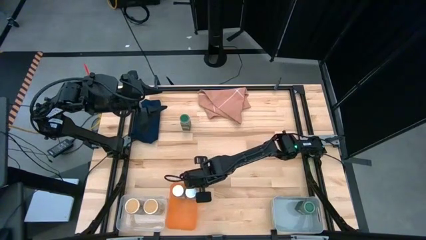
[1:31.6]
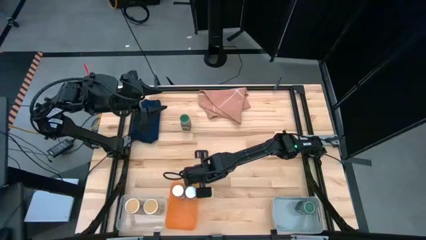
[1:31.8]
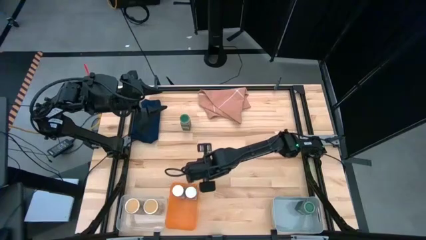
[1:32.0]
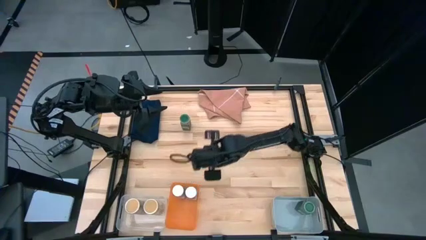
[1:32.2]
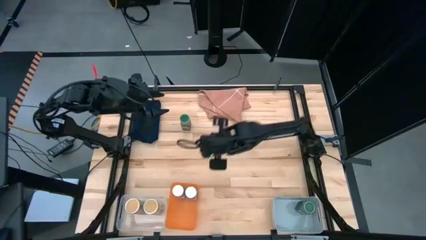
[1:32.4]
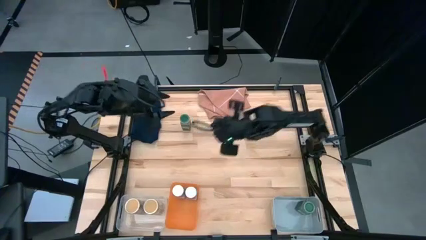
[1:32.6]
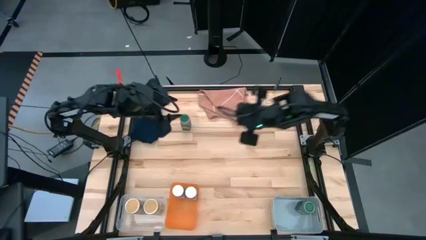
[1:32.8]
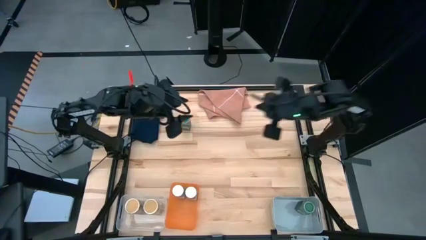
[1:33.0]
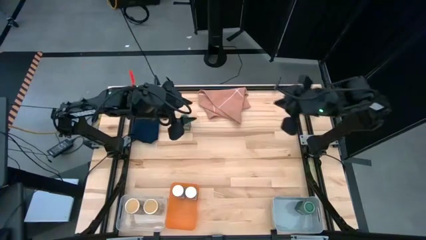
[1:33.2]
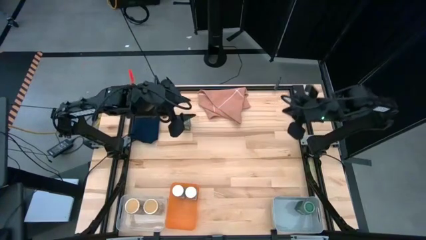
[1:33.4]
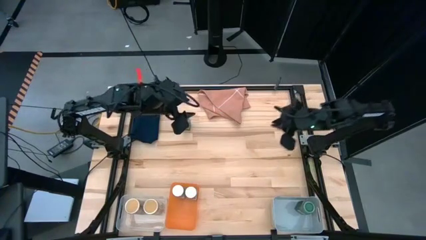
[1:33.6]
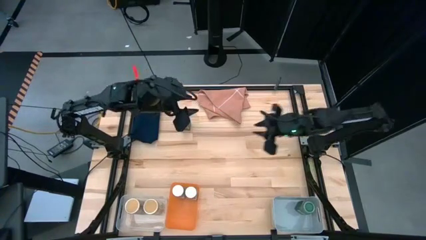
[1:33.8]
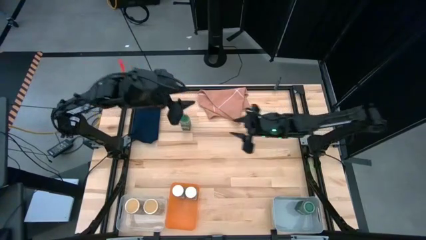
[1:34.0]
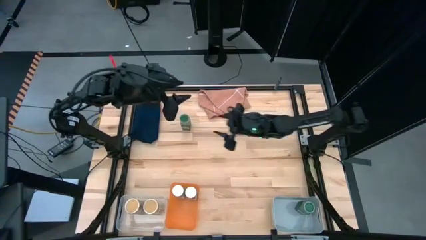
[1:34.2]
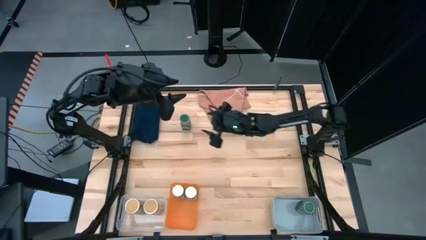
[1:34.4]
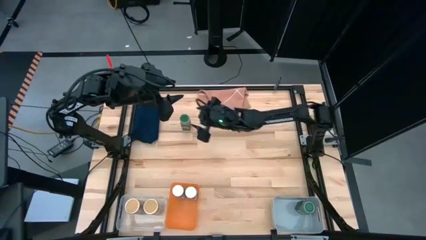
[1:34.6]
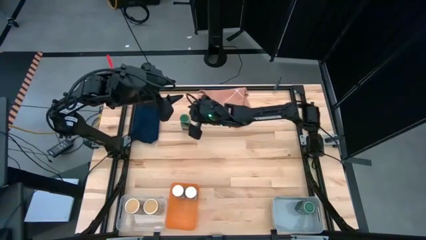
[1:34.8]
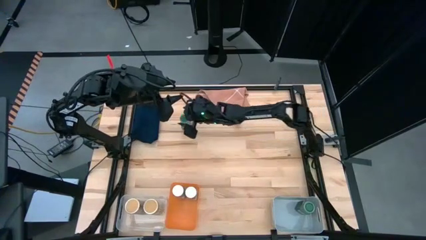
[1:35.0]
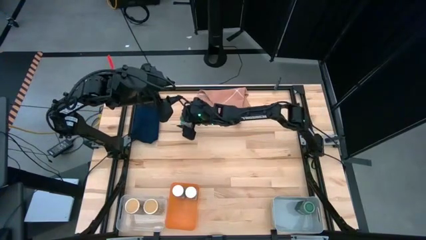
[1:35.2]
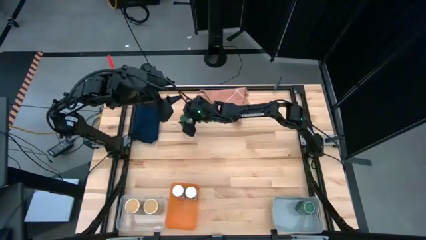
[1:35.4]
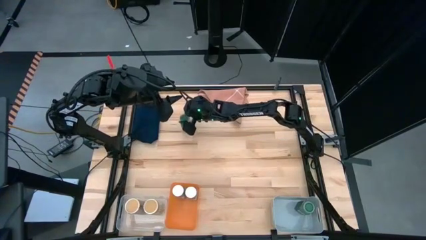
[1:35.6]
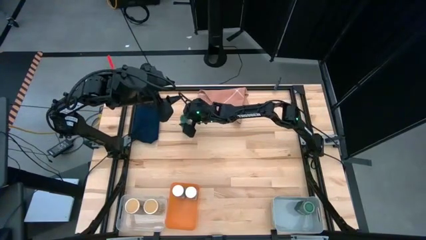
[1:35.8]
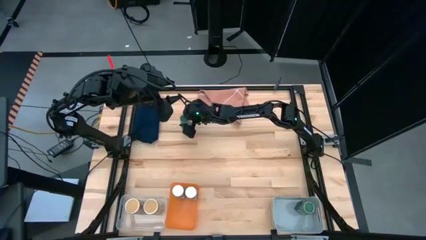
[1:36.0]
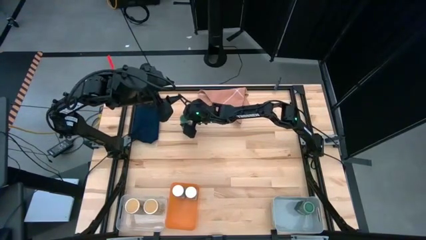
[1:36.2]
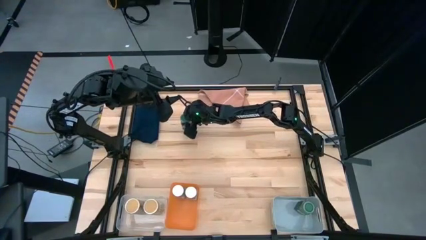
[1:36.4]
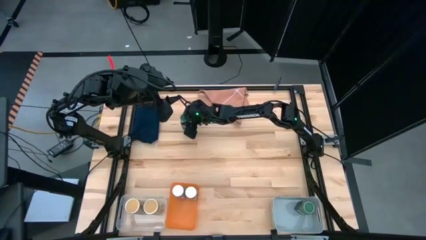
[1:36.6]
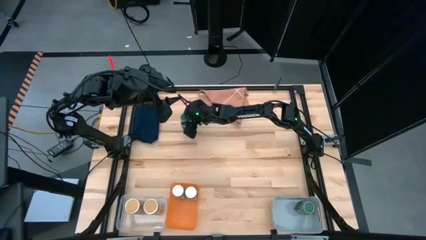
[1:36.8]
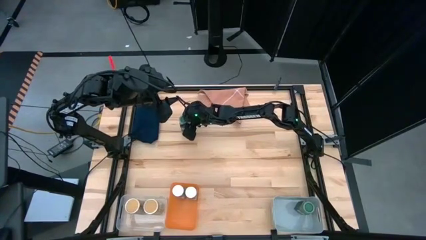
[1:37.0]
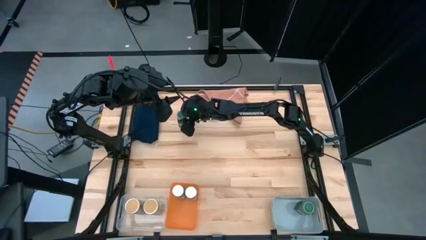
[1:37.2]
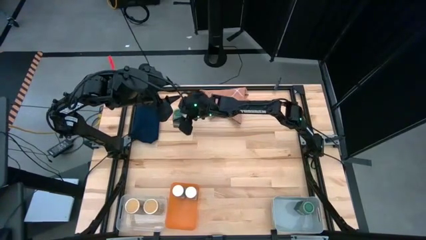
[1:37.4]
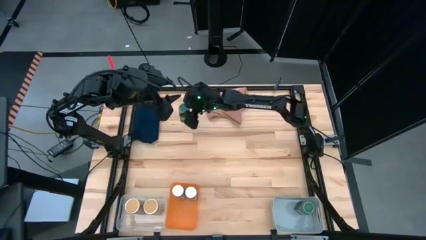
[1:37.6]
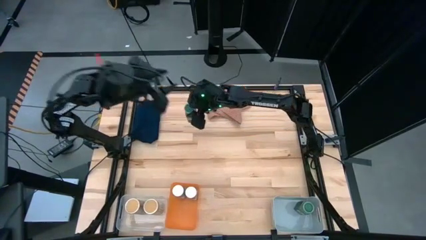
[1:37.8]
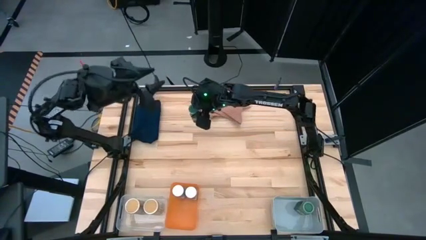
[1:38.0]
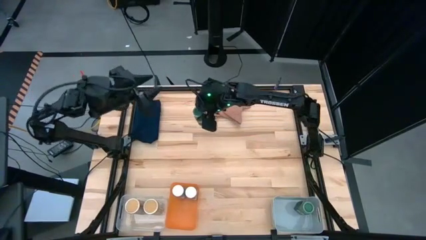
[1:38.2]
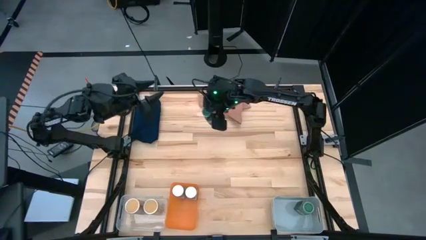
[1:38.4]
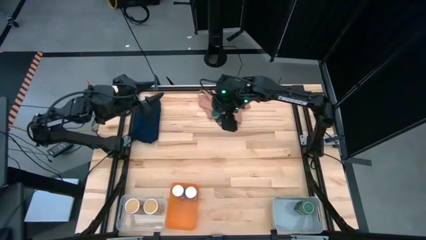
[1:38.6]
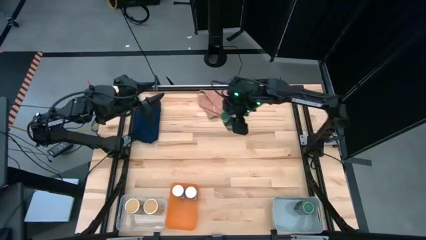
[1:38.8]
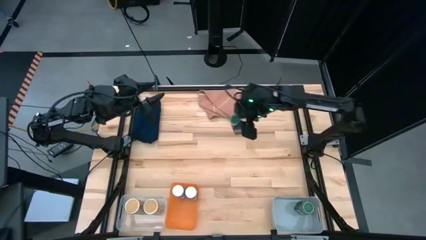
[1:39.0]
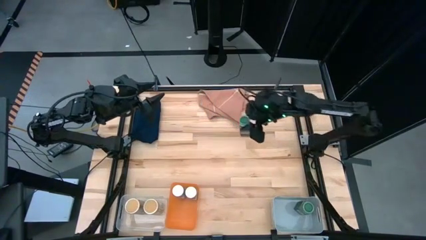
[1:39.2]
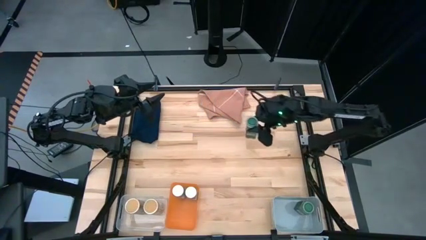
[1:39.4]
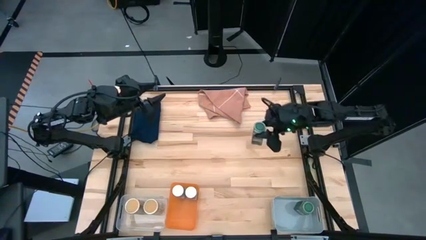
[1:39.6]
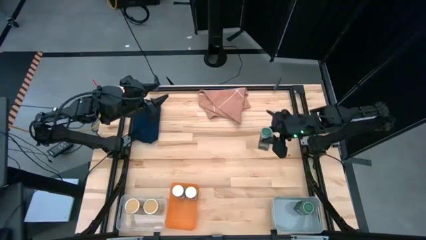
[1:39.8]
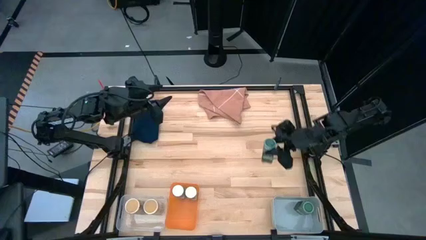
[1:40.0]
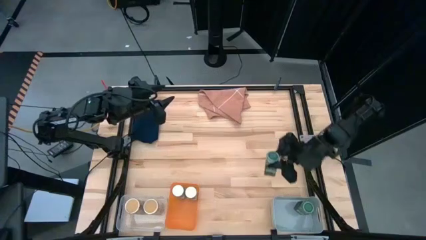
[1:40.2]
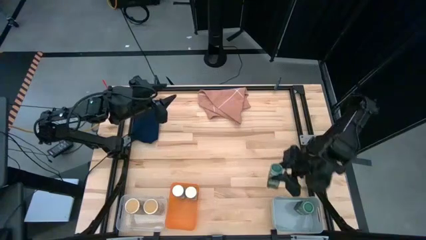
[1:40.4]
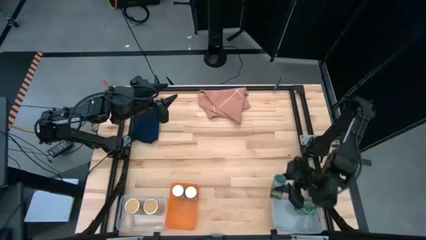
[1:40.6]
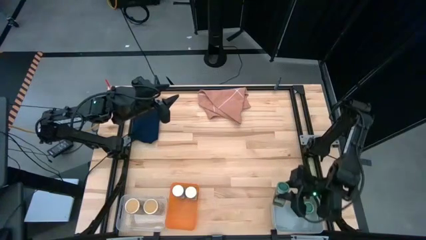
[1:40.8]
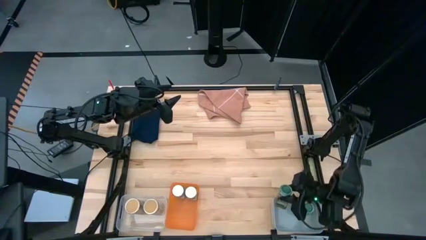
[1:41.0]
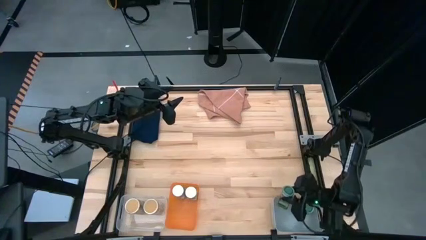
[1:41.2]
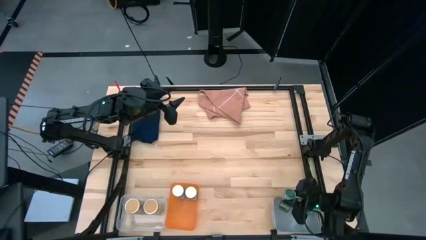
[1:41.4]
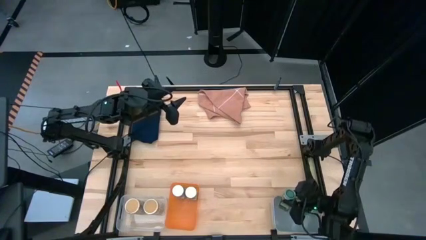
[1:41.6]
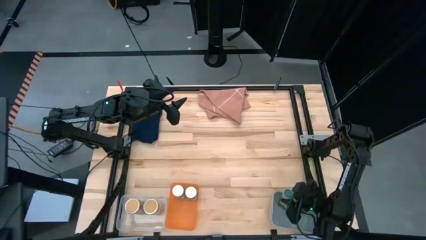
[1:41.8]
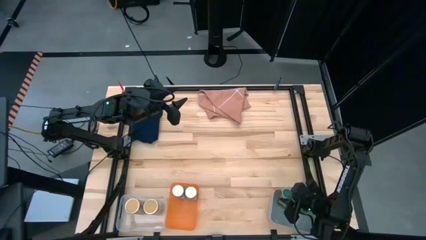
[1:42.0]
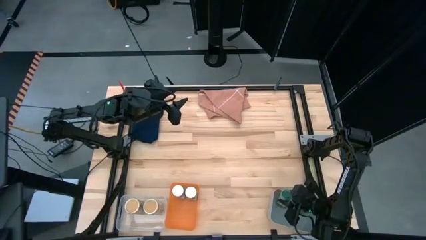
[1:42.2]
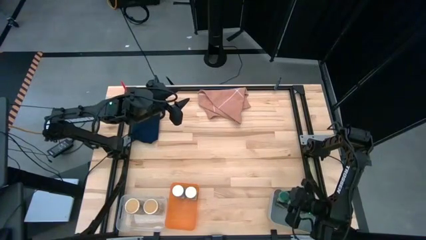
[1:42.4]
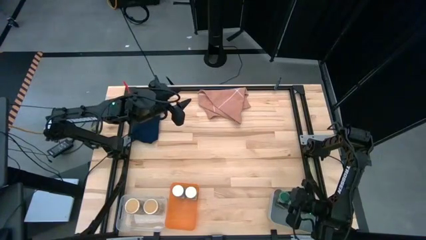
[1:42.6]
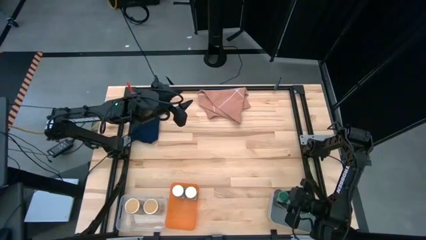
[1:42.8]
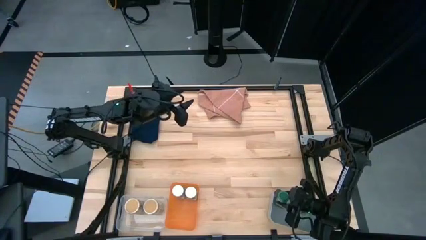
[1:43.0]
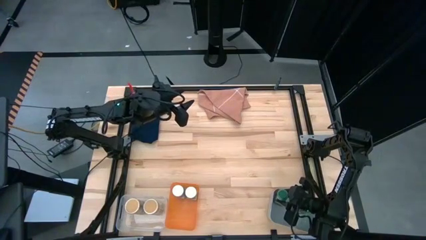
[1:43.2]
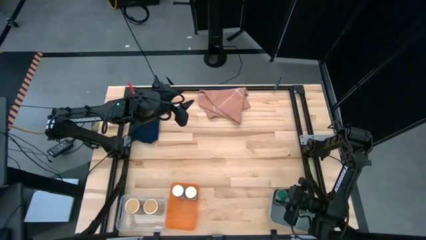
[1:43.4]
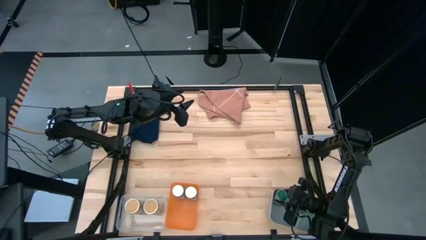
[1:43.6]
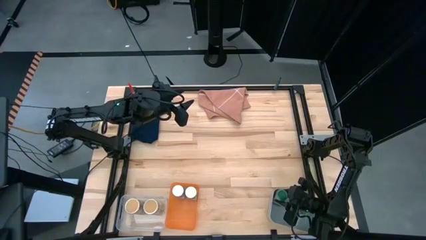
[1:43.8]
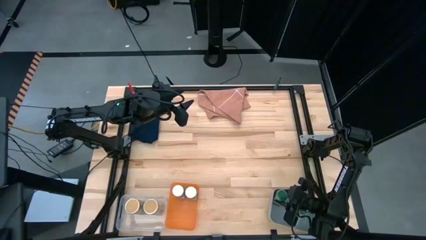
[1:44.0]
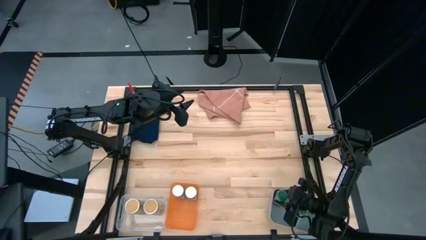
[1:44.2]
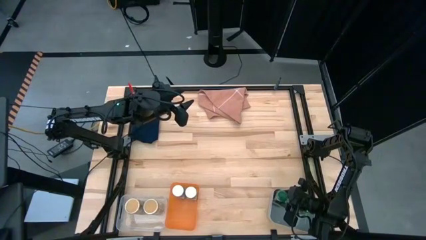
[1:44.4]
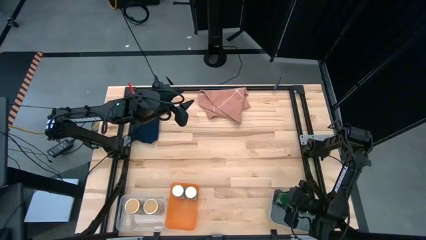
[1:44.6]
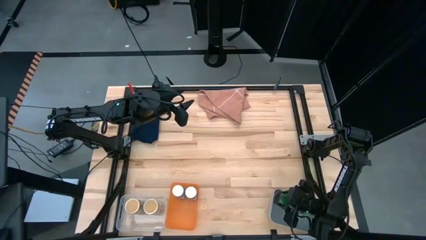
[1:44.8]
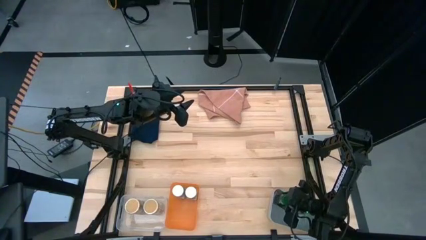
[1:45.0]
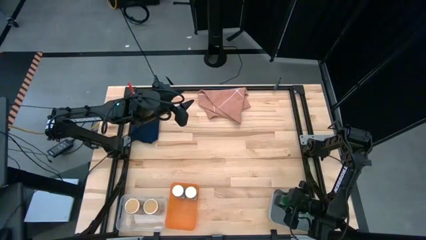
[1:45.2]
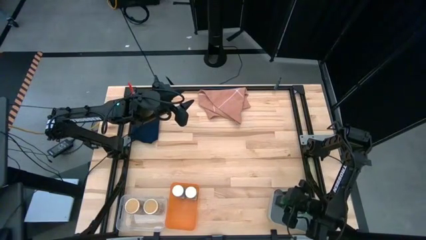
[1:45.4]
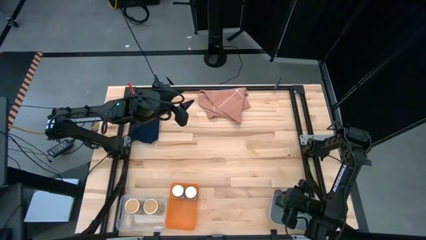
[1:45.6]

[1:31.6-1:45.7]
Task: Sort spices by type
Put the green seasoning bottle into the gray bin
